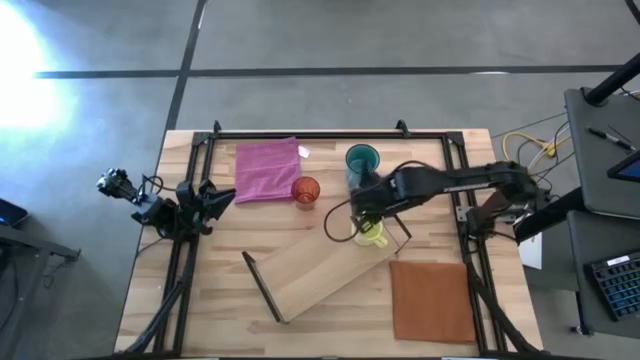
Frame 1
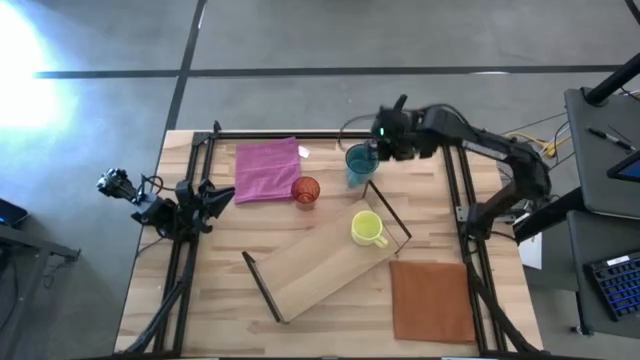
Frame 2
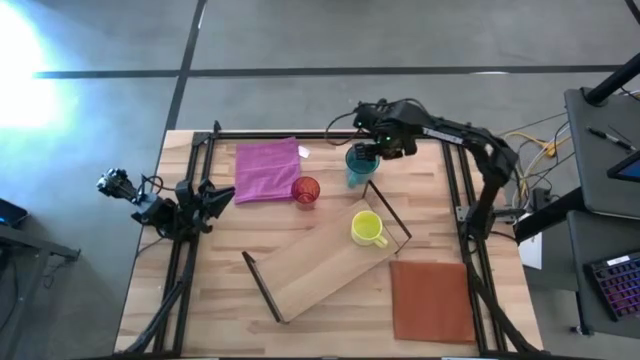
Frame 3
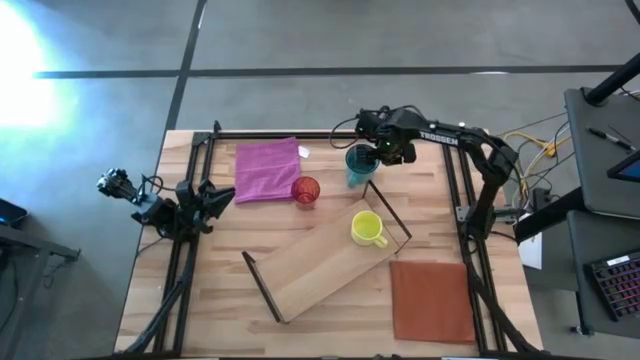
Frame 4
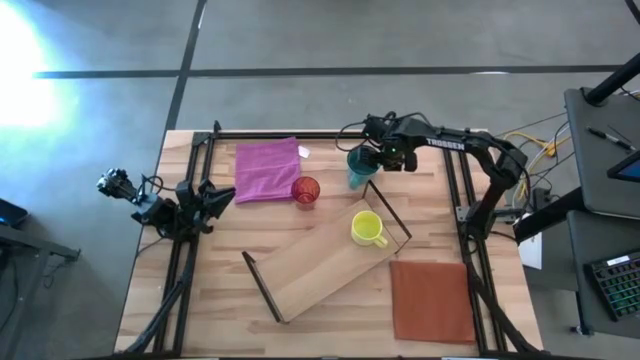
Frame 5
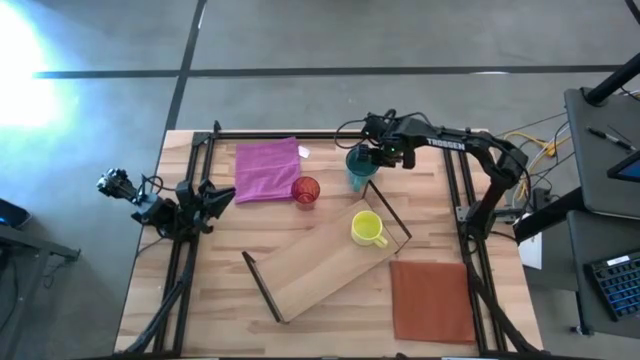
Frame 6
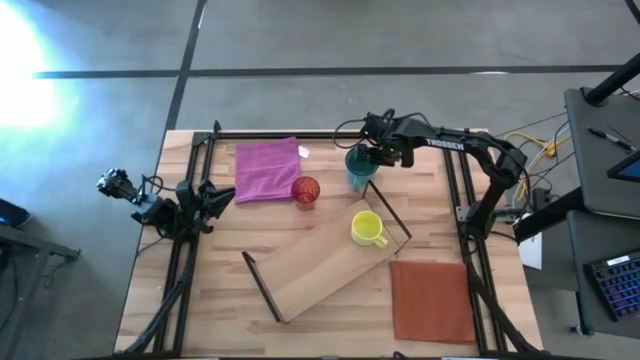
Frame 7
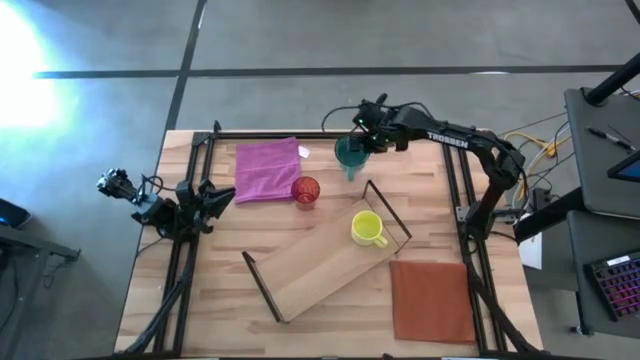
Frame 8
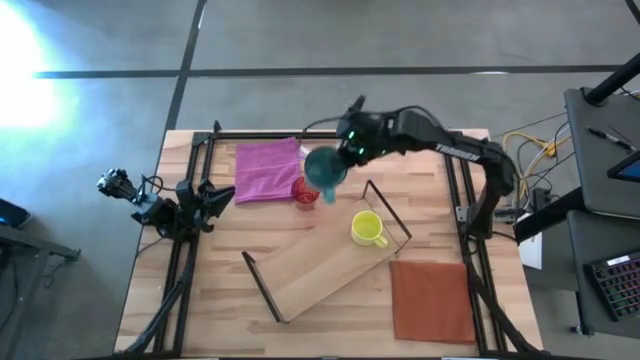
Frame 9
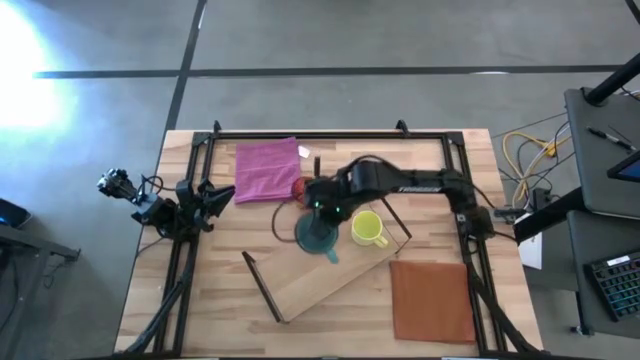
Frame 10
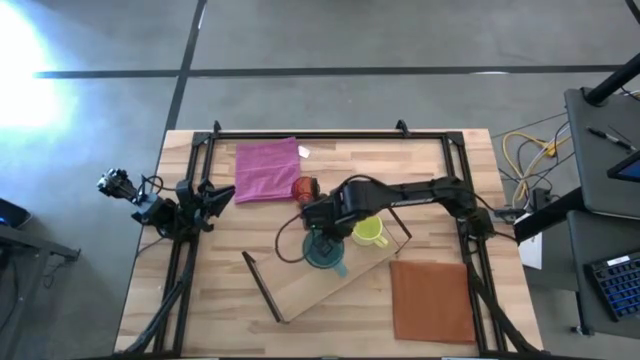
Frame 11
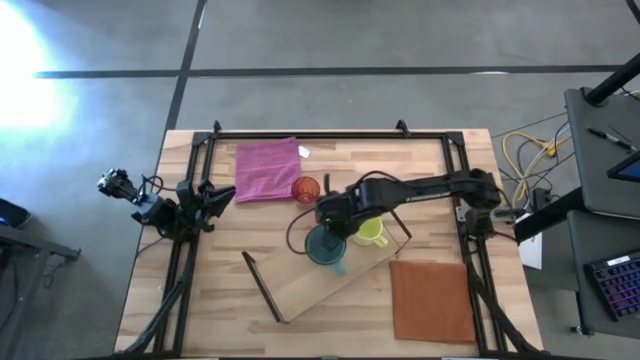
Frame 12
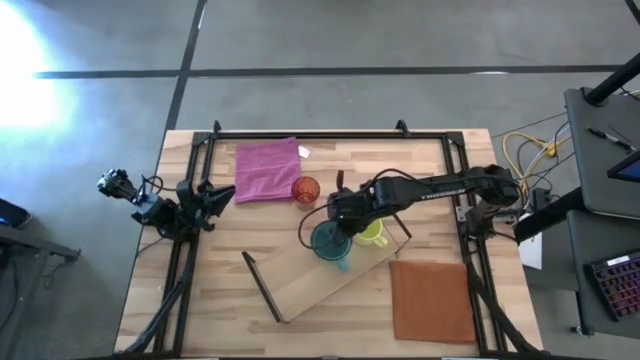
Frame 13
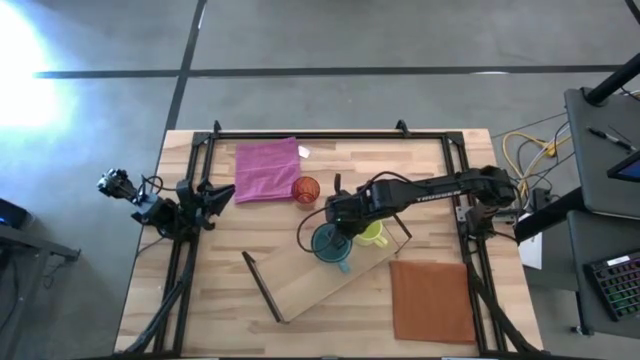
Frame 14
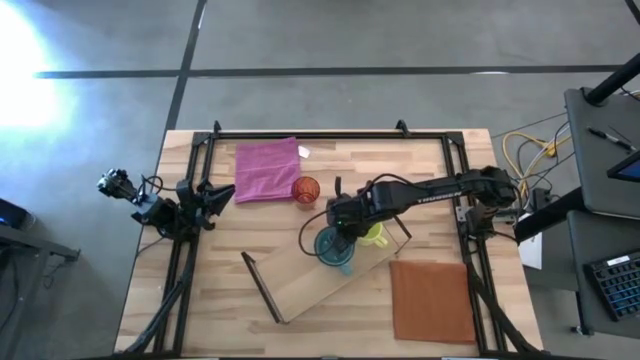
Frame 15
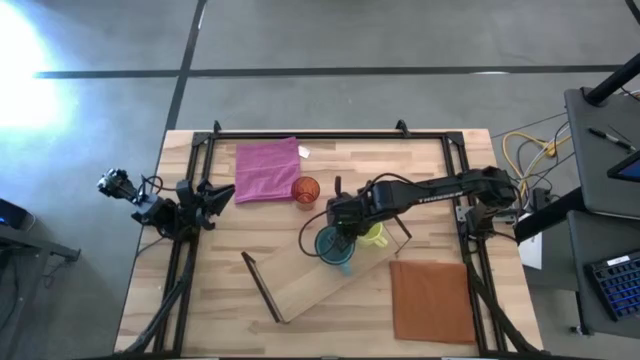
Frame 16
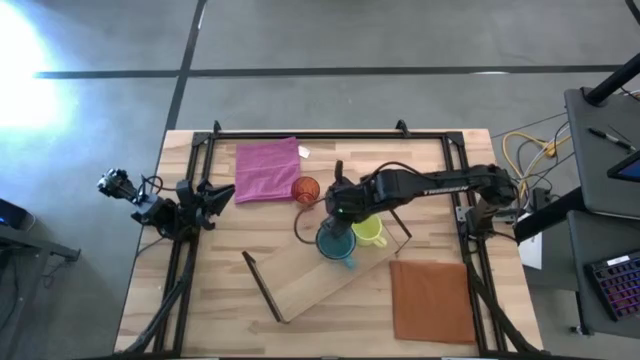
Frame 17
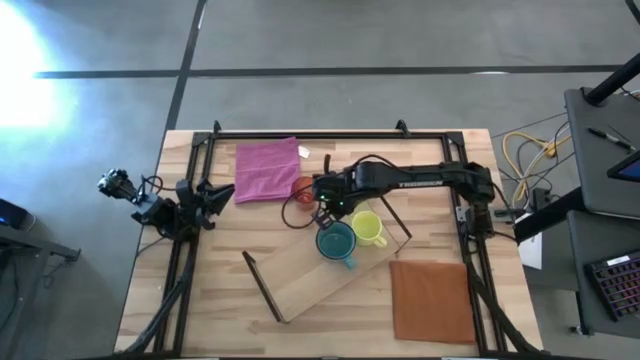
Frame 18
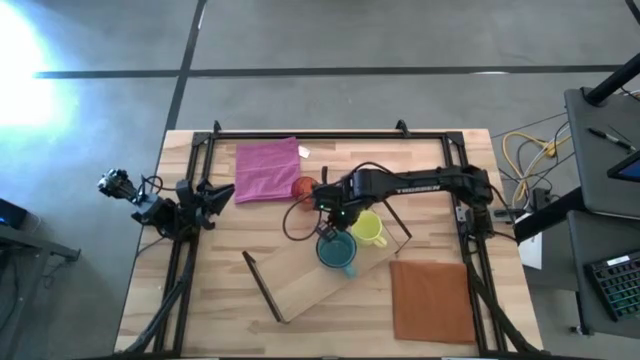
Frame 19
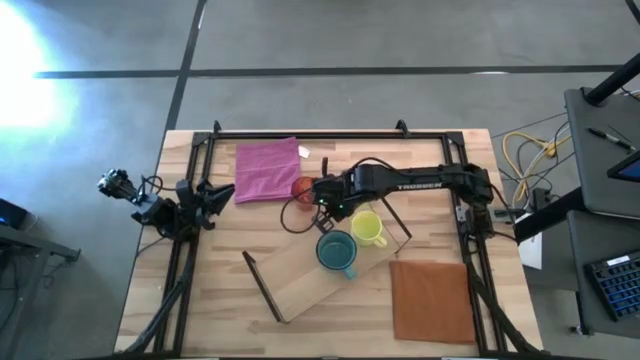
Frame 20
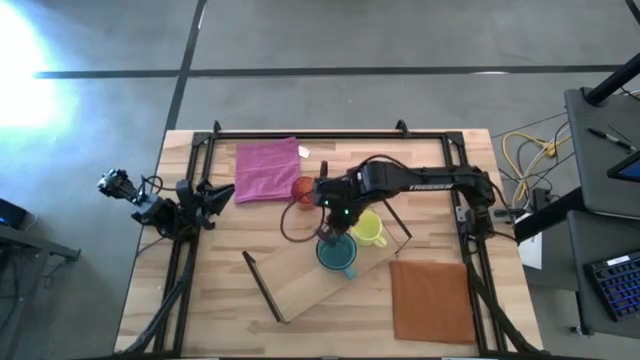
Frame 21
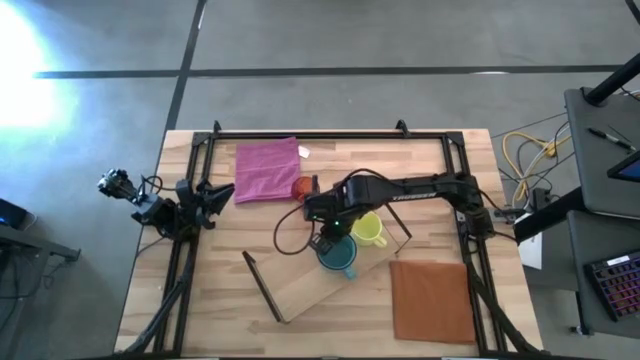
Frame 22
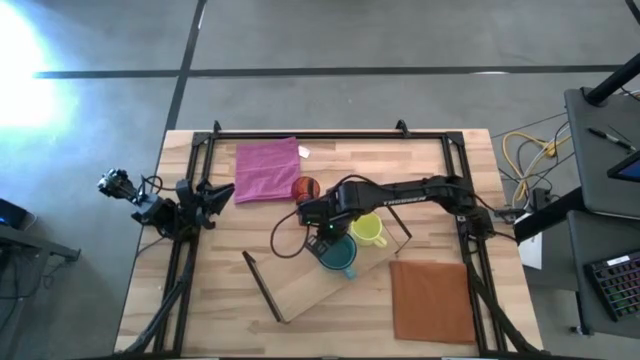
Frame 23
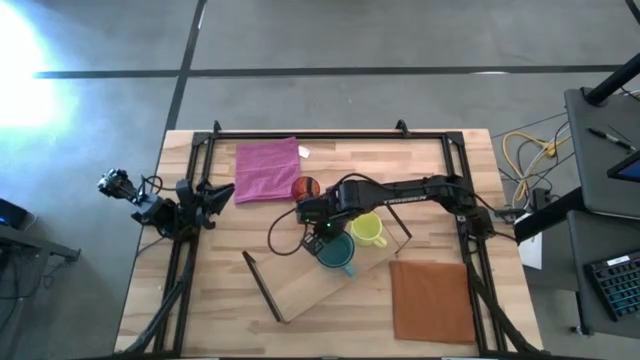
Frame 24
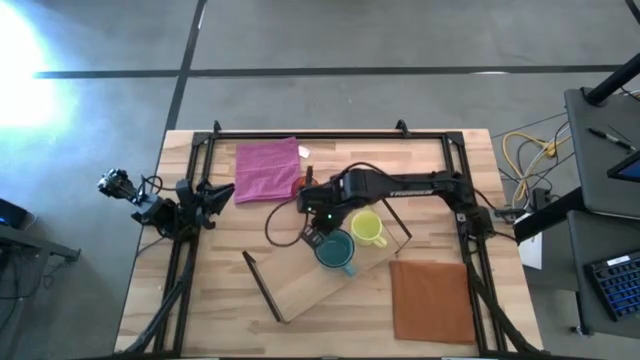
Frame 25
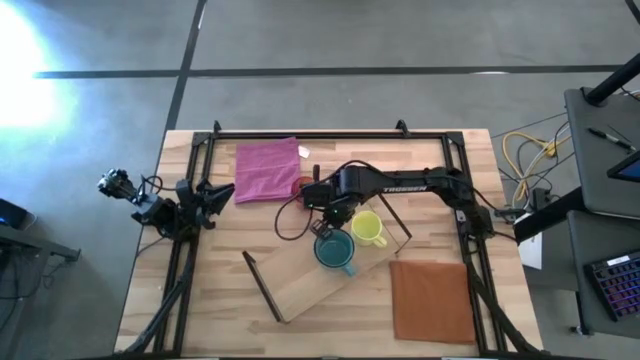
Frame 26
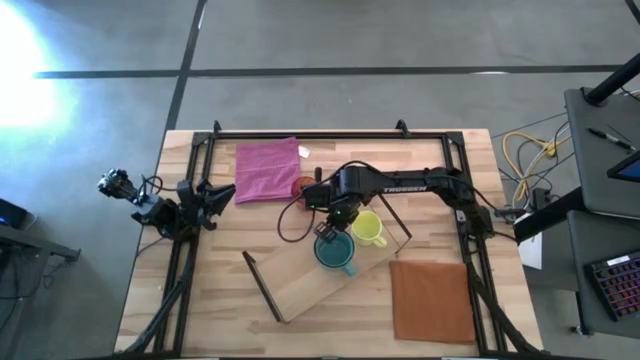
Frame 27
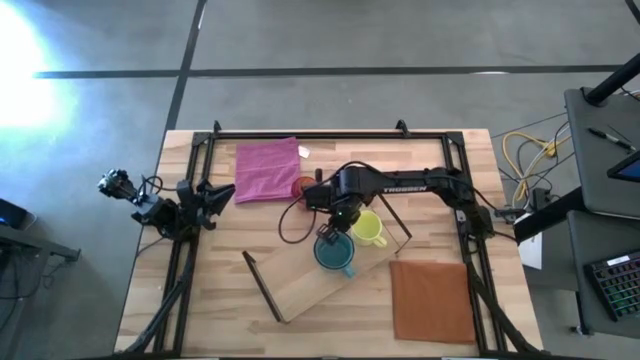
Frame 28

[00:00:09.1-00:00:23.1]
Task: Stack small to large cups/mugs on shelf
Put the blue mug on the shelf

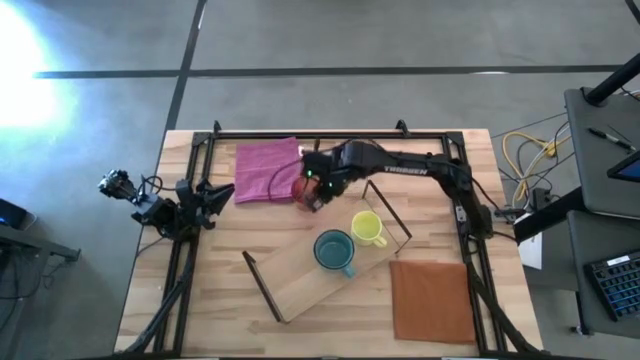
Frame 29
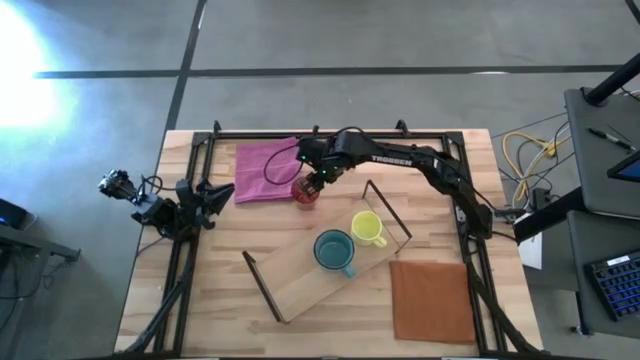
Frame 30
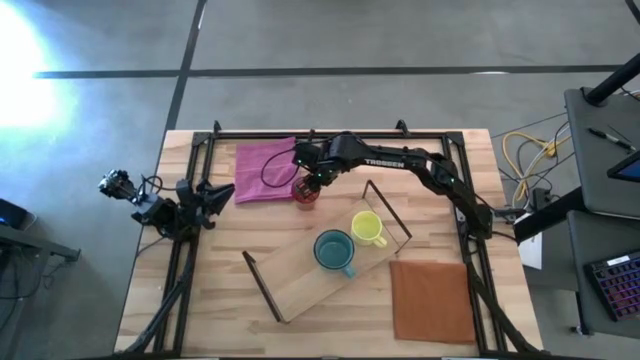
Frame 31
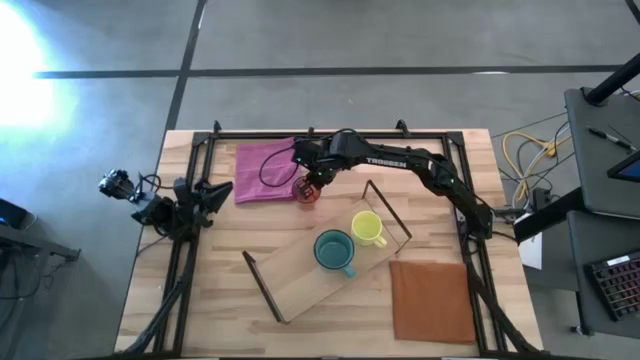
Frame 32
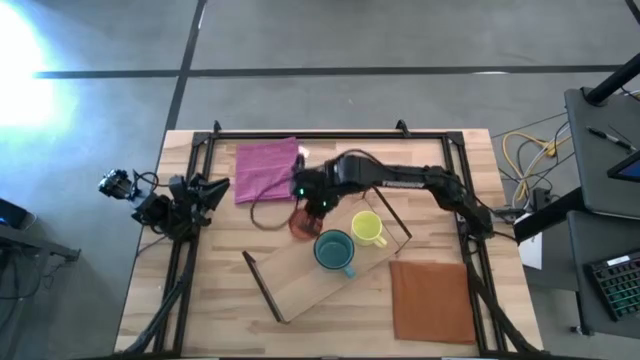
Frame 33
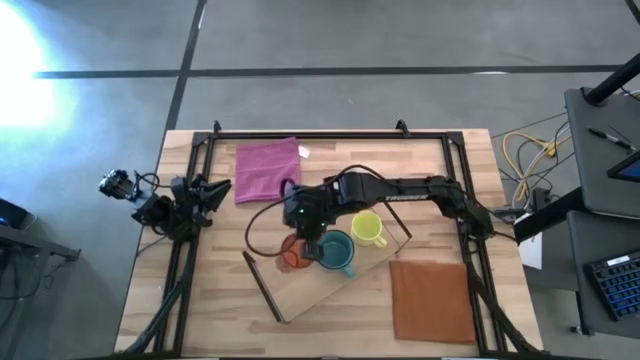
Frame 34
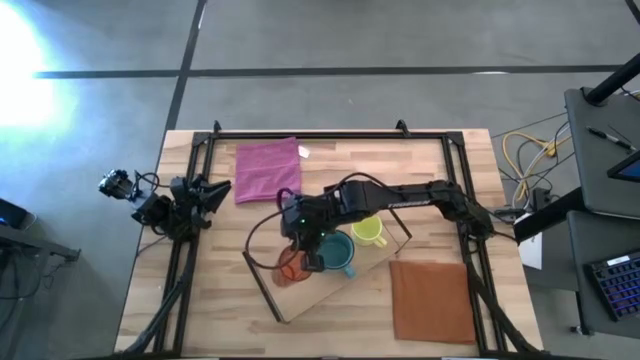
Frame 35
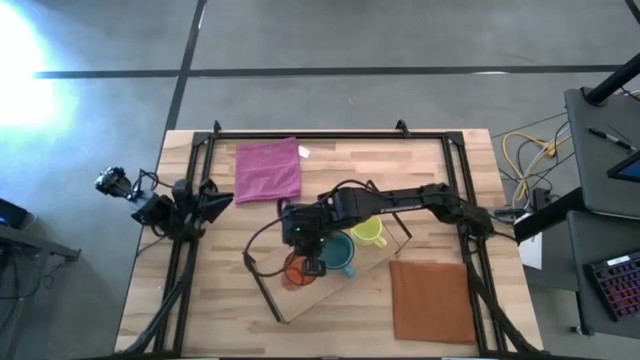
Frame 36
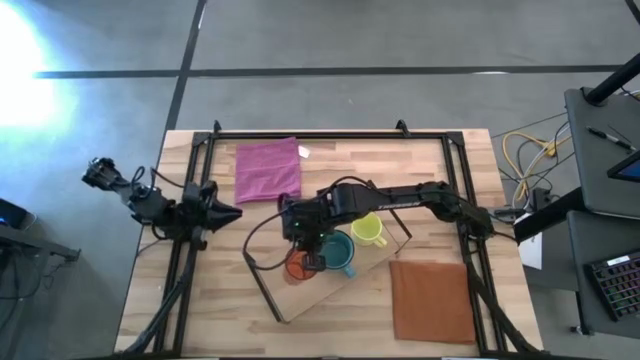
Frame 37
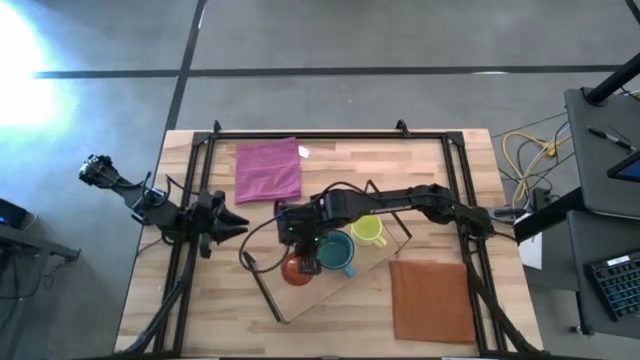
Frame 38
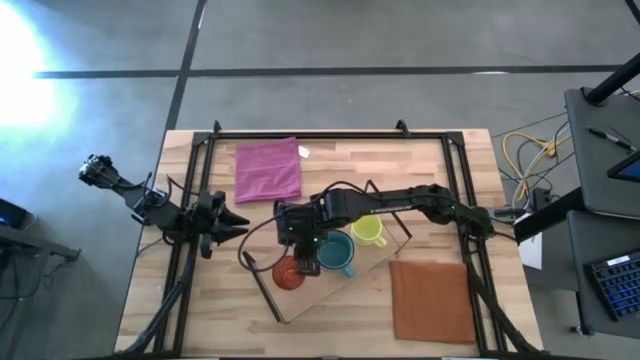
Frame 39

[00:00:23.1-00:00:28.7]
Put the orange glass on the shelf
